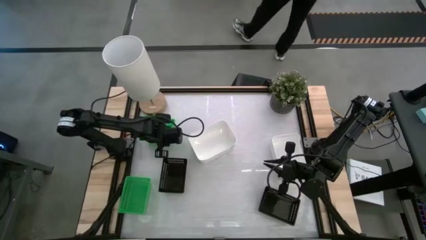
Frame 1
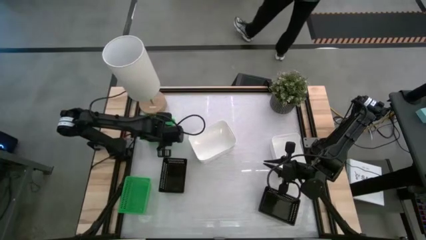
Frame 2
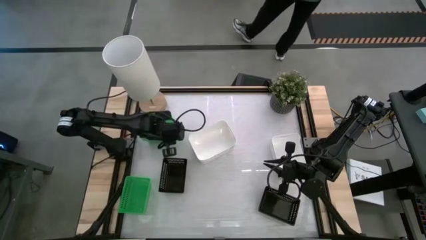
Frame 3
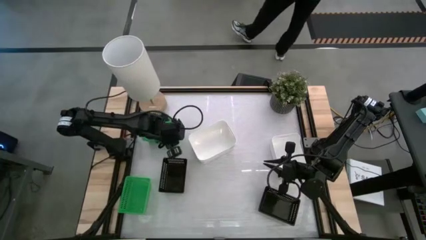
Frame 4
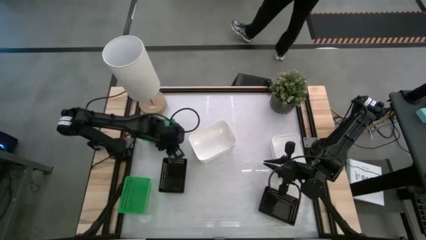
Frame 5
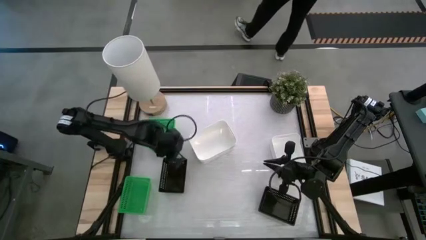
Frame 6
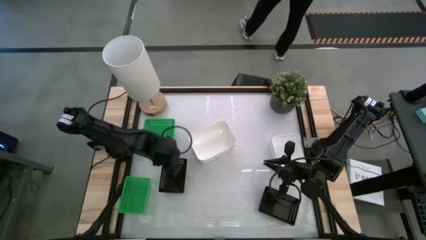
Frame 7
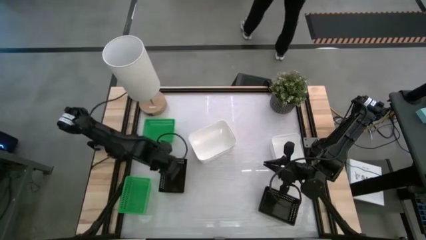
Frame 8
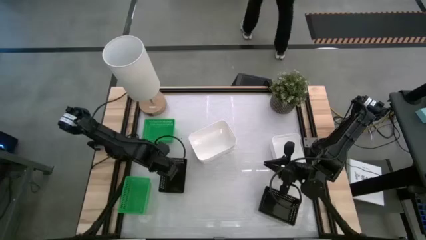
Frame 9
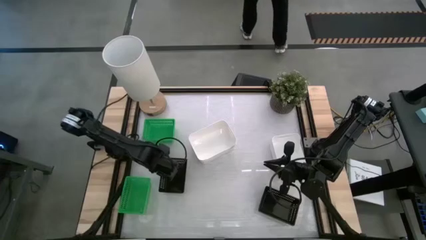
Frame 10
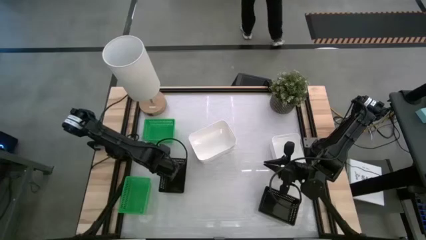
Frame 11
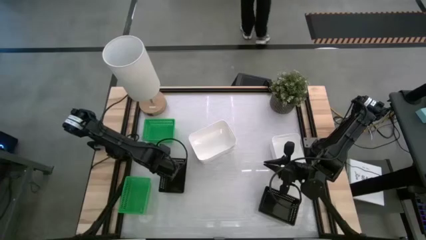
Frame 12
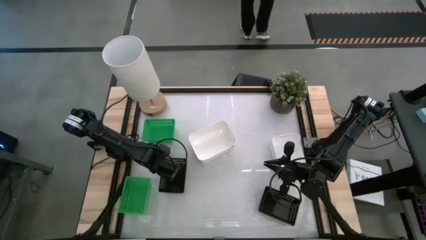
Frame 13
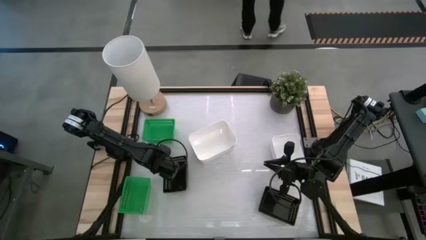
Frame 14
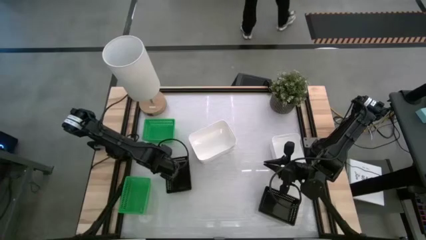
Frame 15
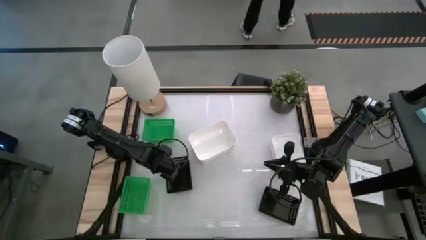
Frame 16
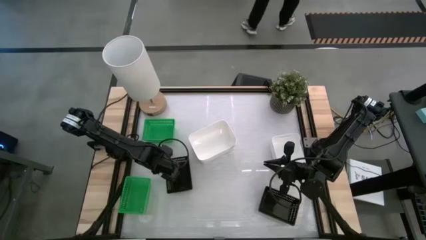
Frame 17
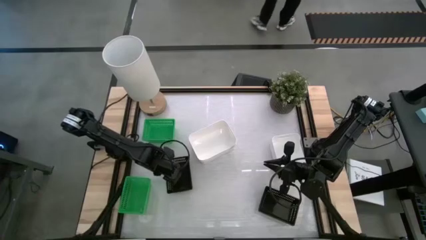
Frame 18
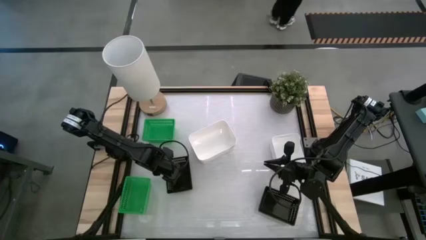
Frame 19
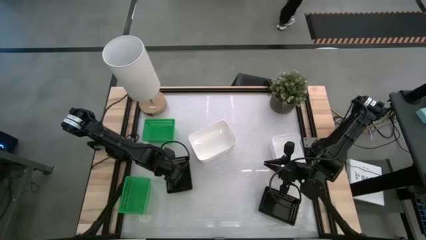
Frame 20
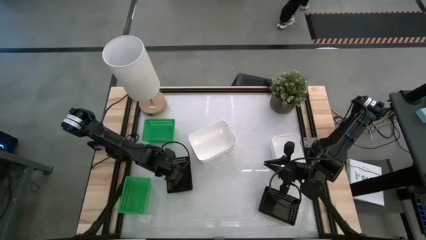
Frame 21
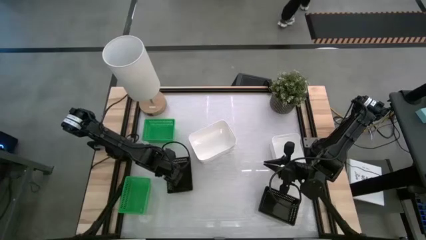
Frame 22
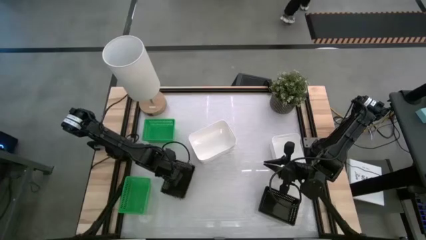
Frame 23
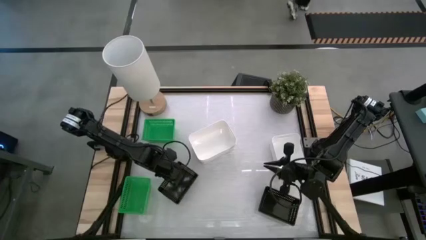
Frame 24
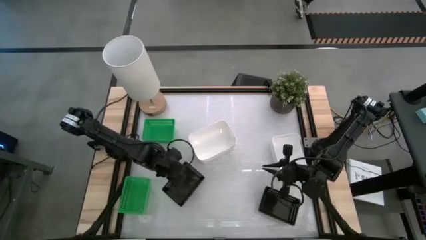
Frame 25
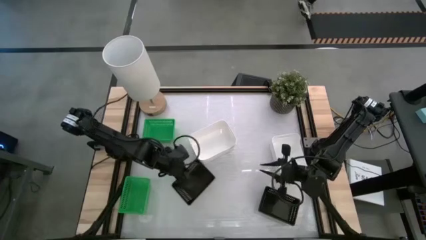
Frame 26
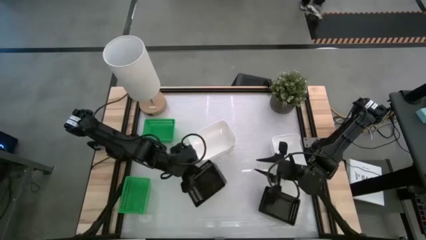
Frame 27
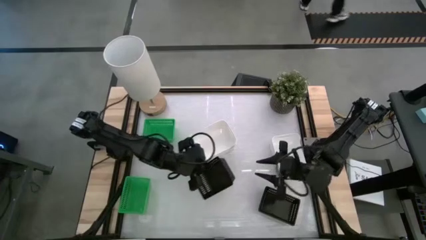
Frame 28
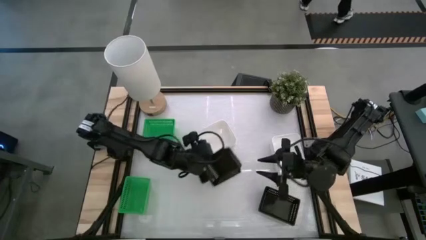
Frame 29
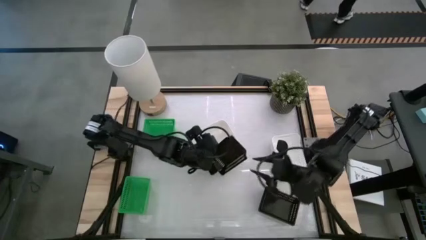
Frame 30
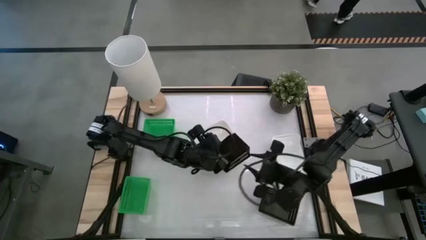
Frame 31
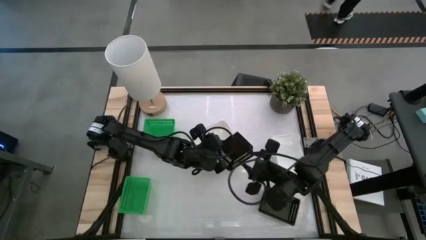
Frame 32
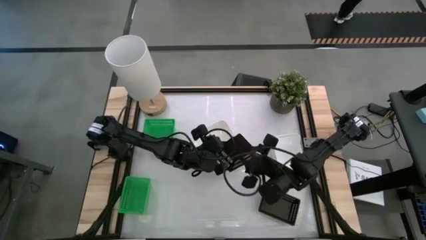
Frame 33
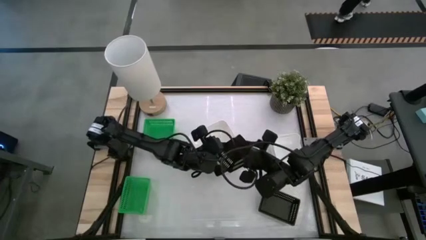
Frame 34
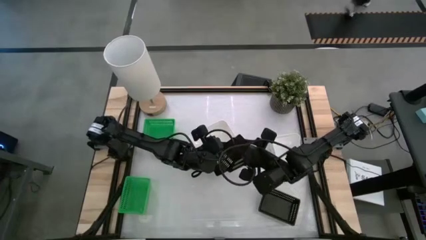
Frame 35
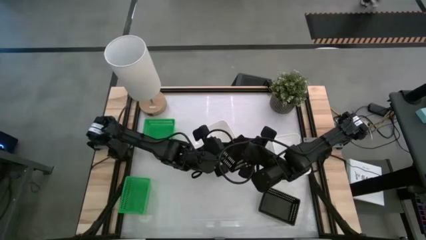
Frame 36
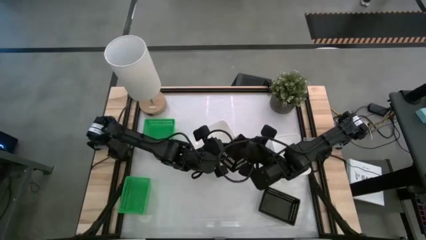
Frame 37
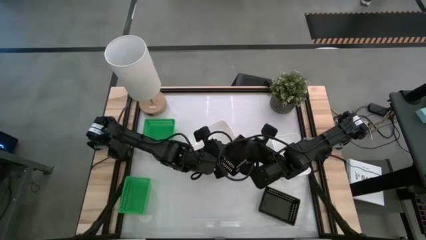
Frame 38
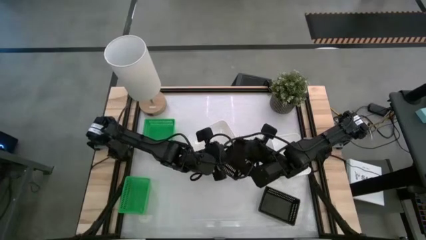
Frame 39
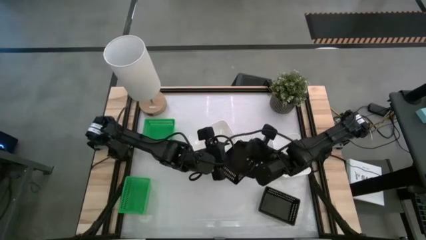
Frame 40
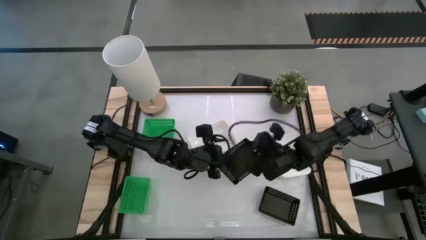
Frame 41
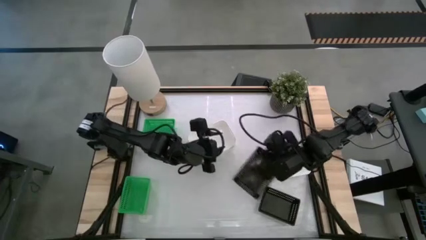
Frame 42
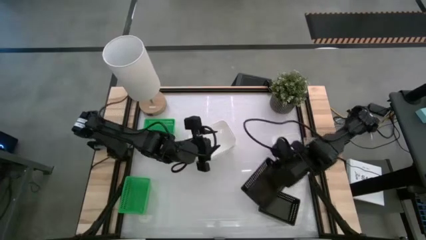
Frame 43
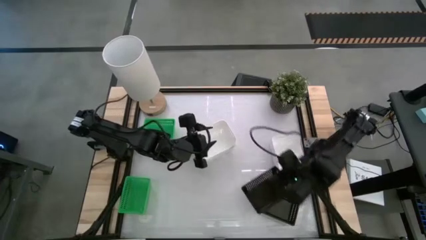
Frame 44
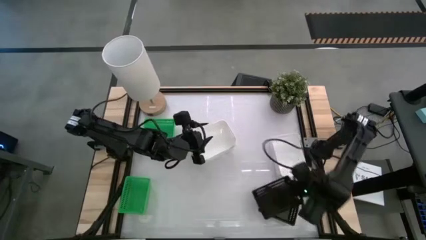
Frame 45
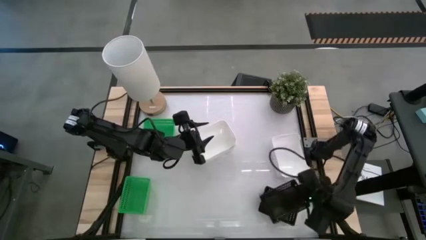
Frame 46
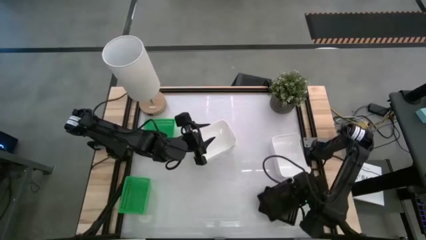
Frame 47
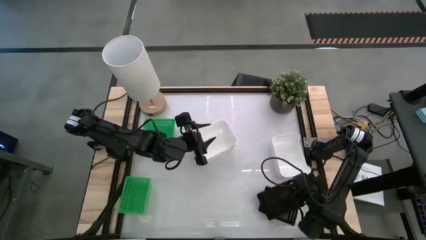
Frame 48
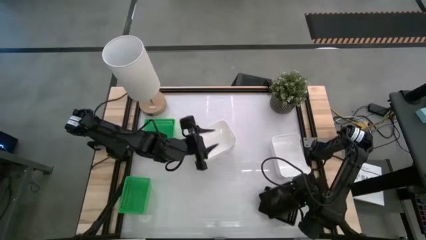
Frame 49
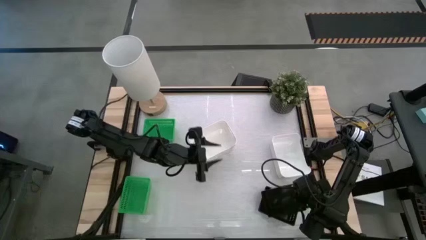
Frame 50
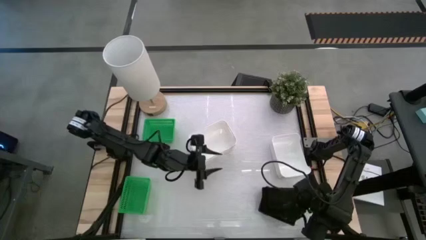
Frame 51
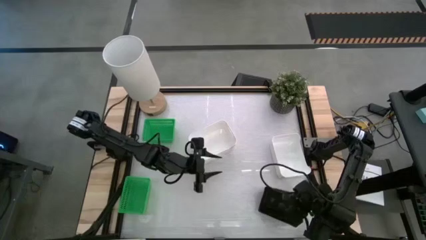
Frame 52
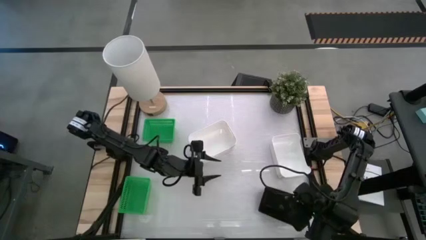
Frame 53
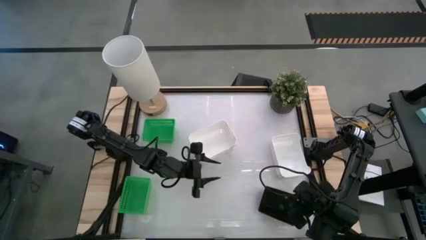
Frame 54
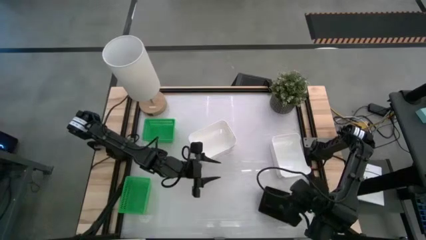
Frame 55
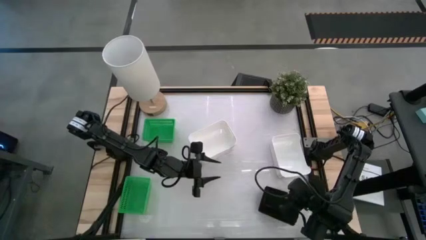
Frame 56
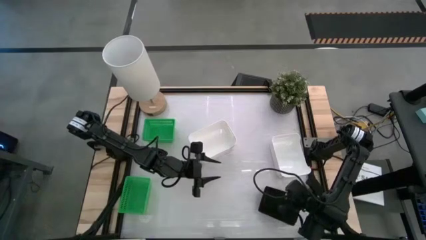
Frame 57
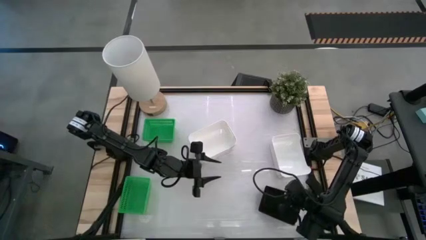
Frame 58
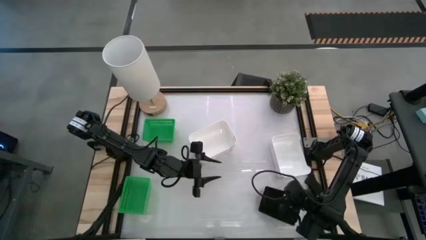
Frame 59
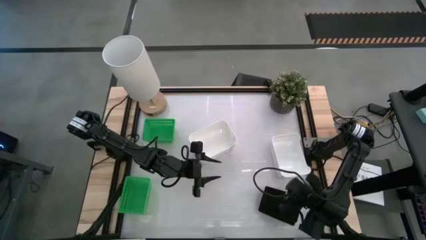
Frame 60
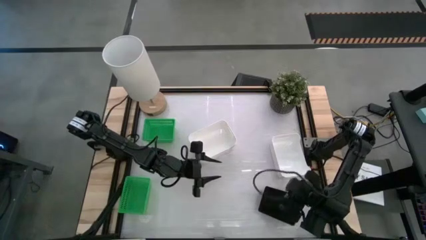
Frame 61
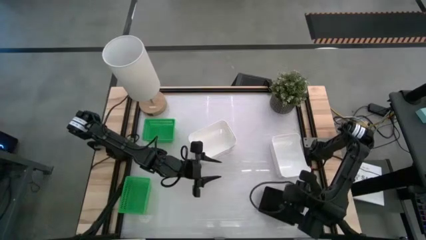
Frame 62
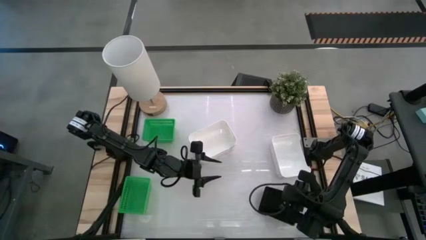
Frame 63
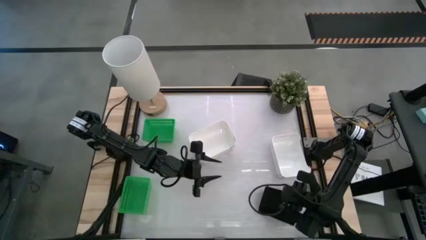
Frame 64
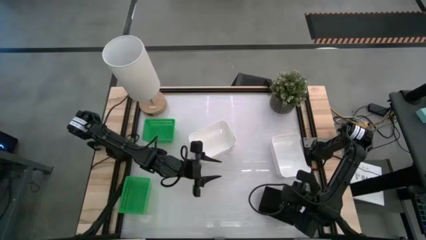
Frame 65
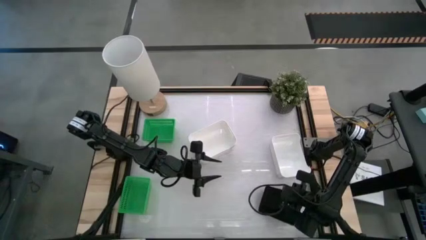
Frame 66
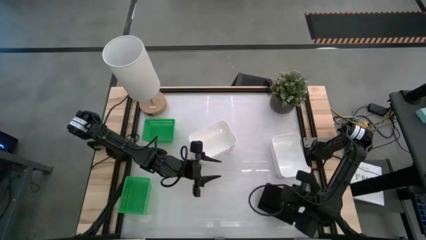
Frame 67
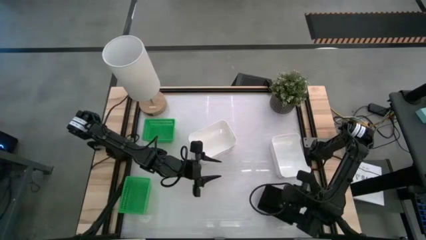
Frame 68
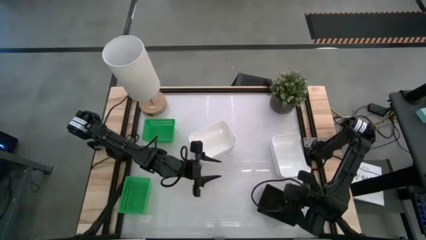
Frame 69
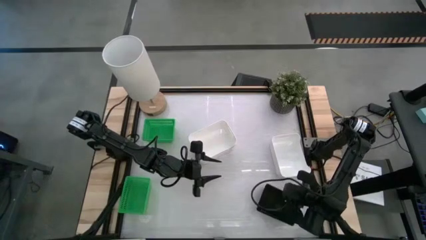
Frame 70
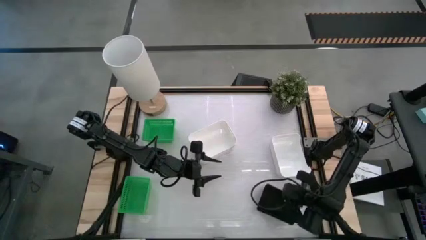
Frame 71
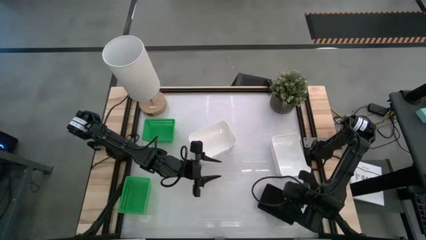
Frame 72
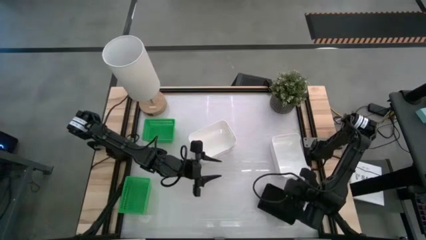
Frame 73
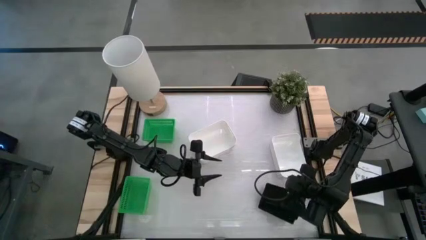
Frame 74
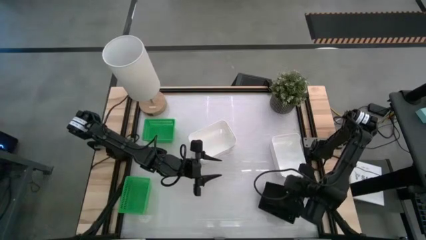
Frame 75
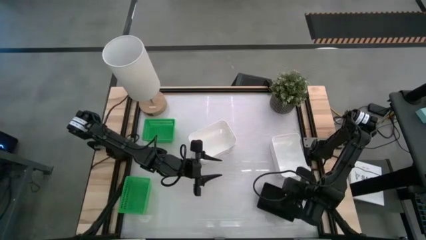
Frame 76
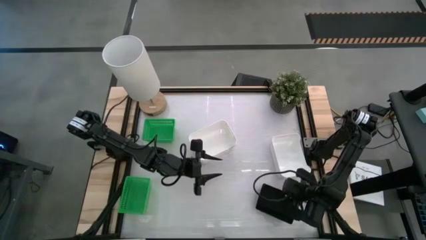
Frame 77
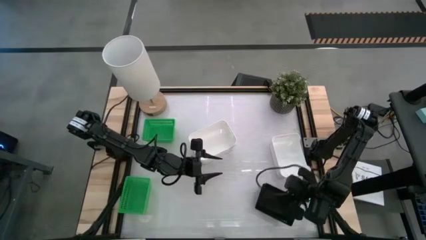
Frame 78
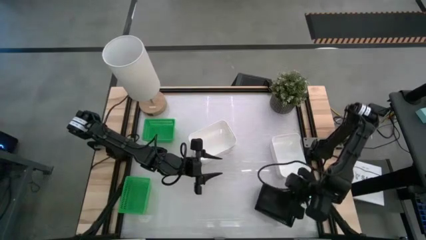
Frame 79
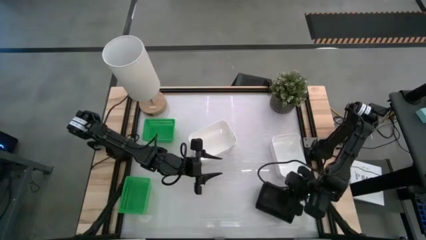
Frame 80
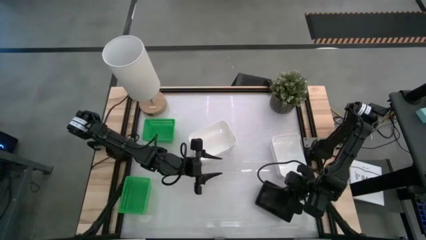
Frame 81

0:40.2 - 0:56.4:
Stack the left black bin on top of the black bin
